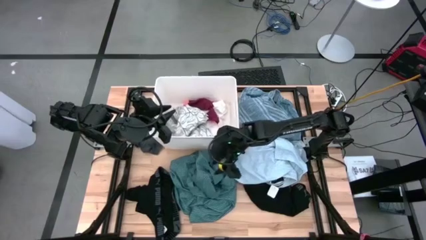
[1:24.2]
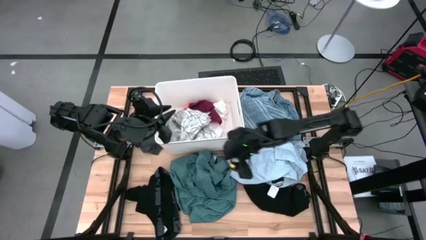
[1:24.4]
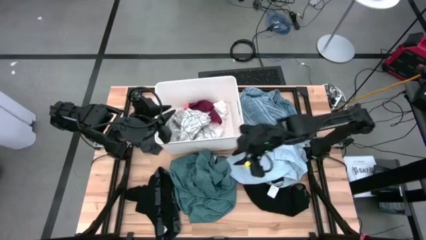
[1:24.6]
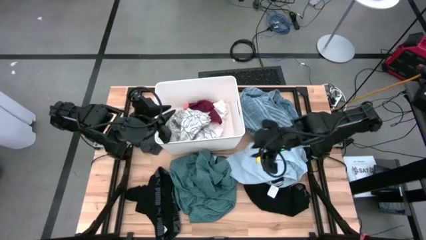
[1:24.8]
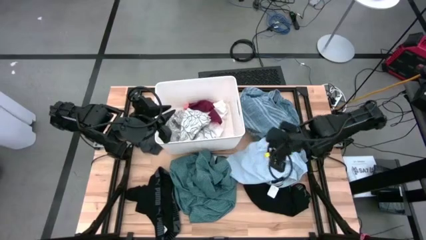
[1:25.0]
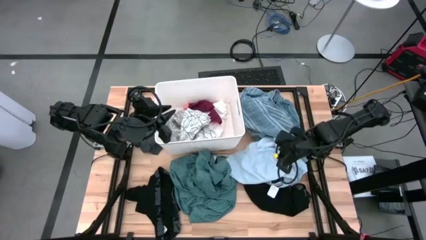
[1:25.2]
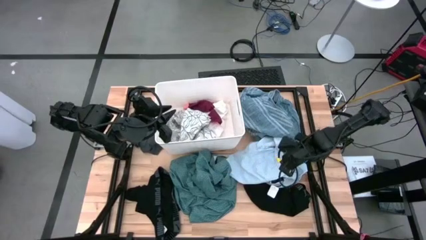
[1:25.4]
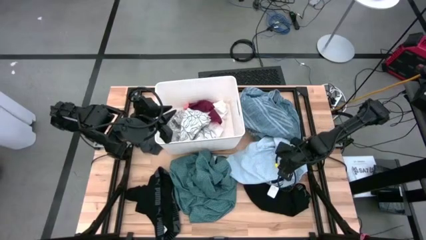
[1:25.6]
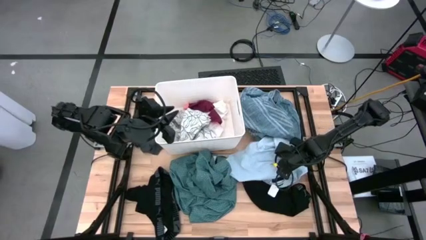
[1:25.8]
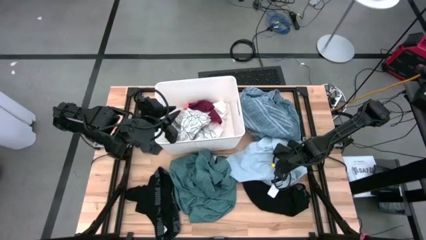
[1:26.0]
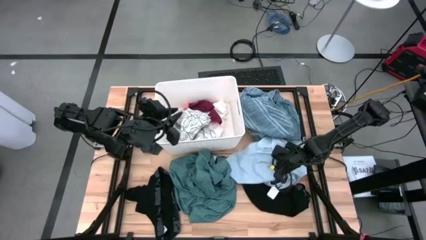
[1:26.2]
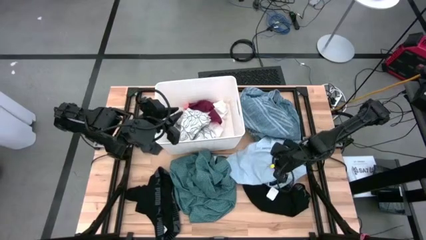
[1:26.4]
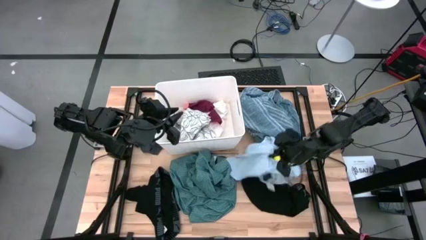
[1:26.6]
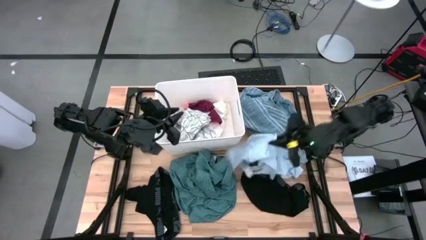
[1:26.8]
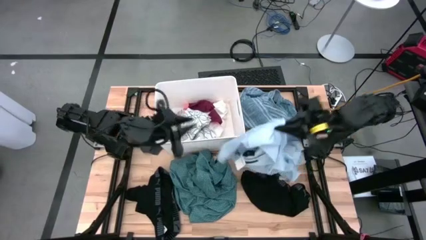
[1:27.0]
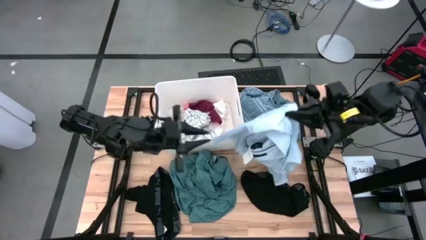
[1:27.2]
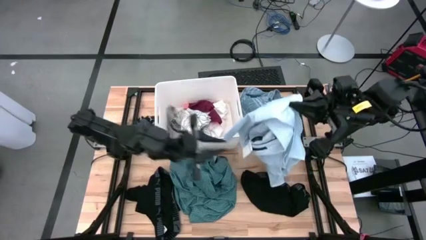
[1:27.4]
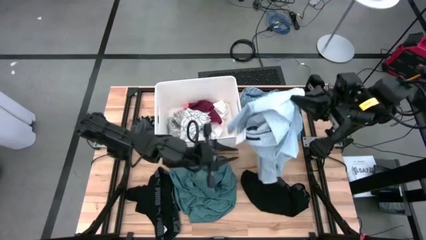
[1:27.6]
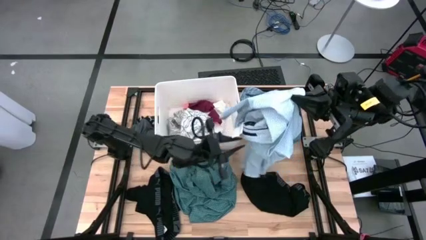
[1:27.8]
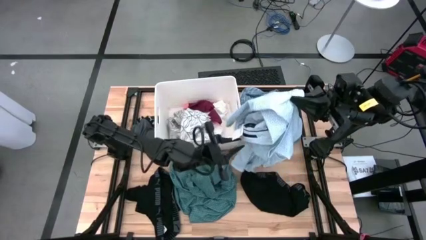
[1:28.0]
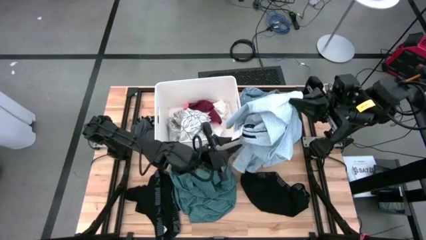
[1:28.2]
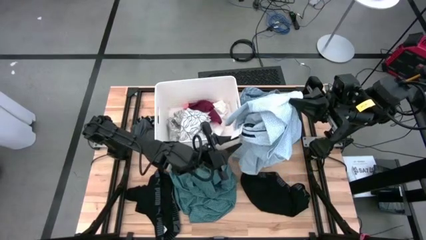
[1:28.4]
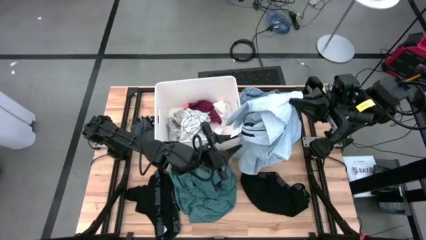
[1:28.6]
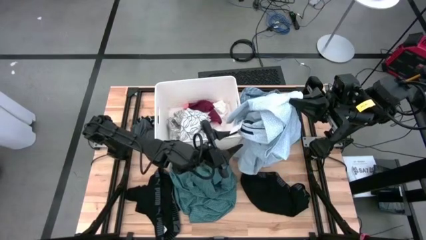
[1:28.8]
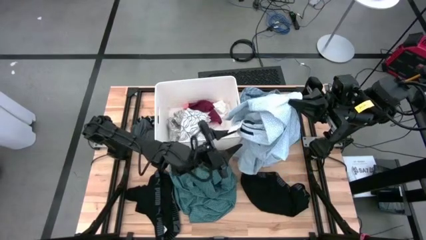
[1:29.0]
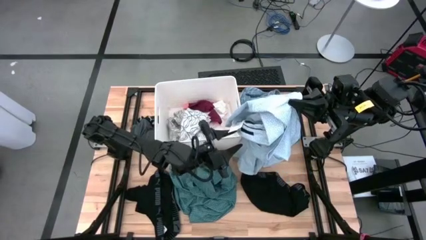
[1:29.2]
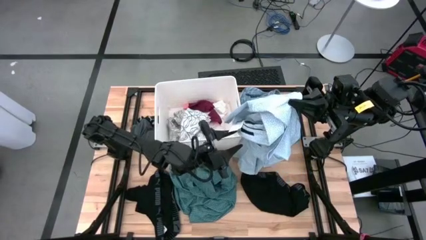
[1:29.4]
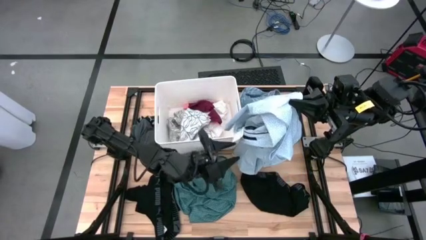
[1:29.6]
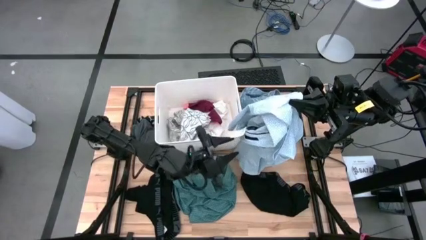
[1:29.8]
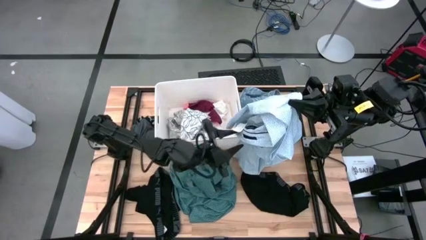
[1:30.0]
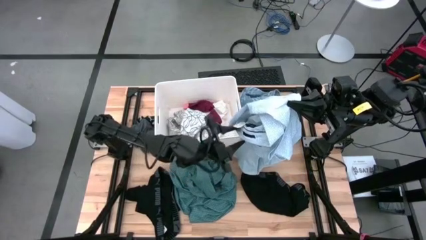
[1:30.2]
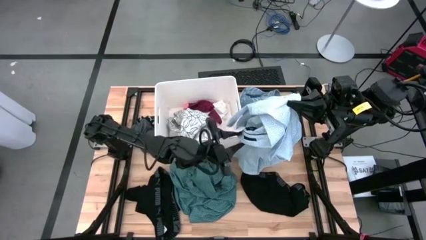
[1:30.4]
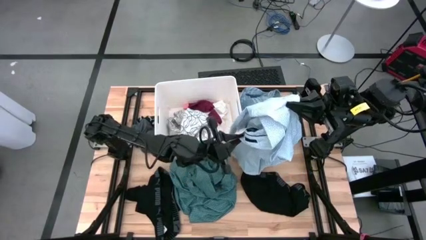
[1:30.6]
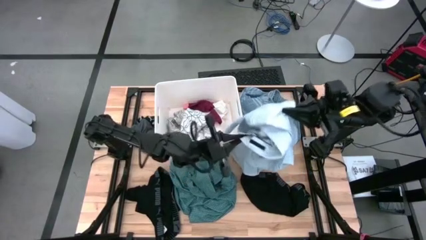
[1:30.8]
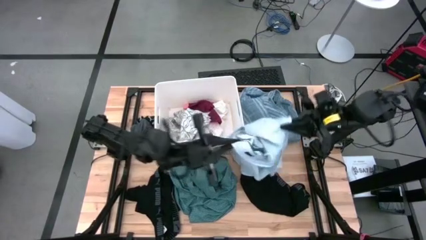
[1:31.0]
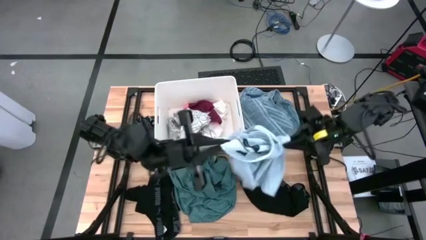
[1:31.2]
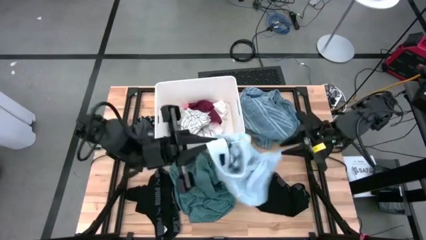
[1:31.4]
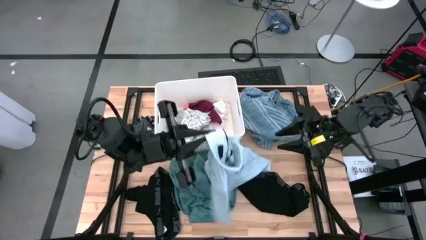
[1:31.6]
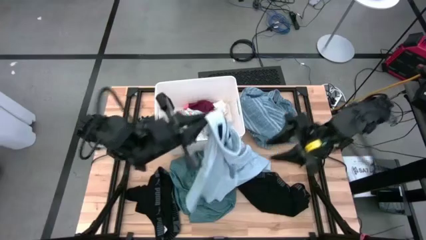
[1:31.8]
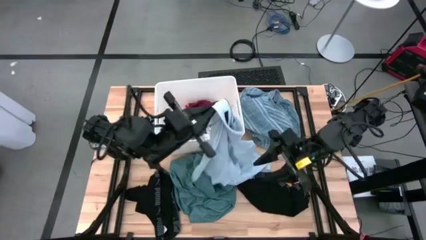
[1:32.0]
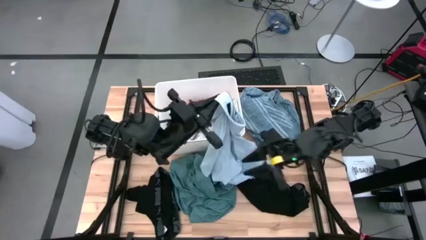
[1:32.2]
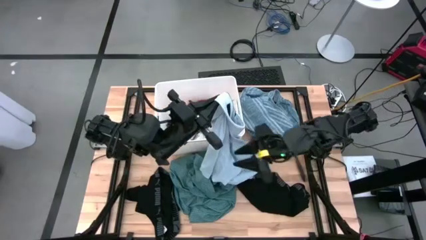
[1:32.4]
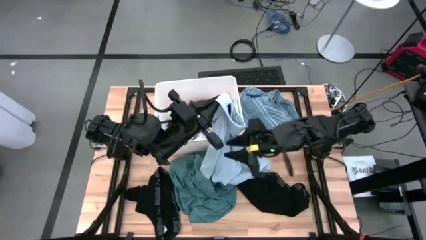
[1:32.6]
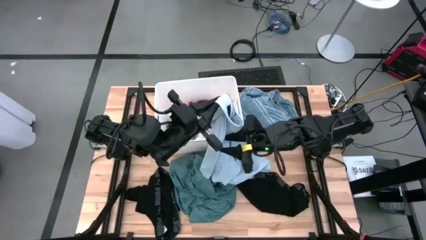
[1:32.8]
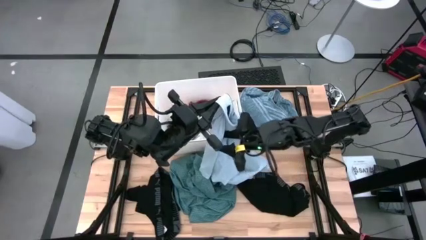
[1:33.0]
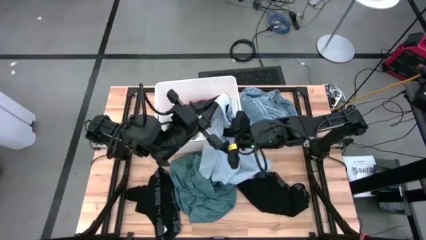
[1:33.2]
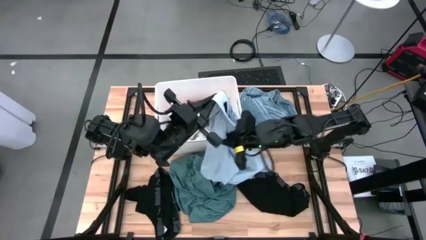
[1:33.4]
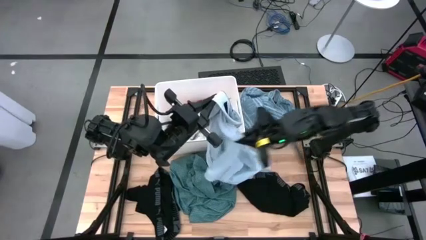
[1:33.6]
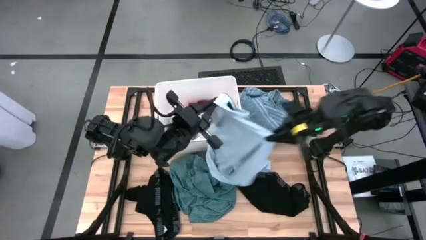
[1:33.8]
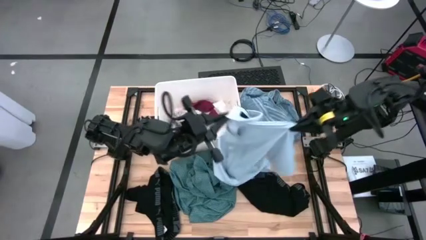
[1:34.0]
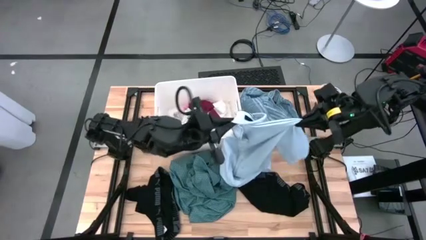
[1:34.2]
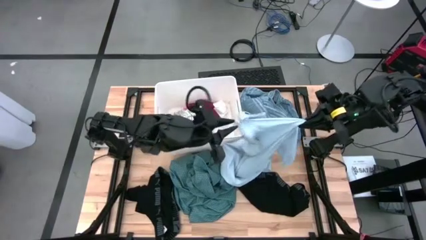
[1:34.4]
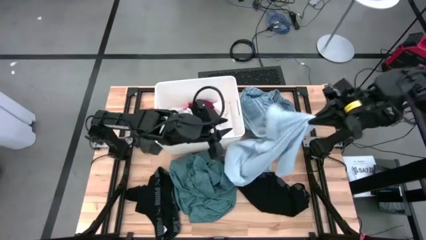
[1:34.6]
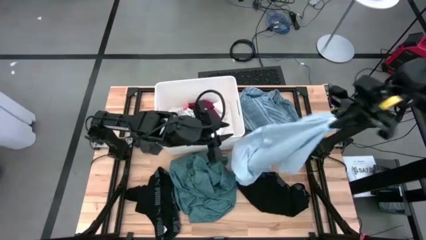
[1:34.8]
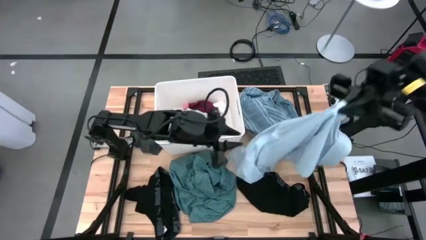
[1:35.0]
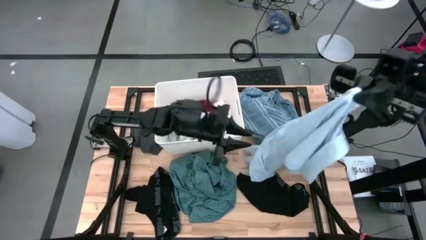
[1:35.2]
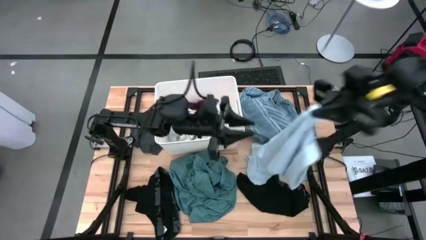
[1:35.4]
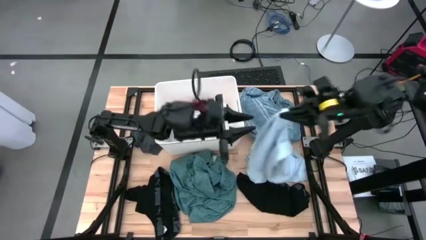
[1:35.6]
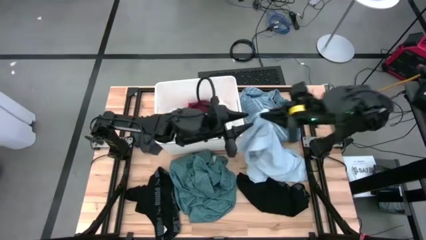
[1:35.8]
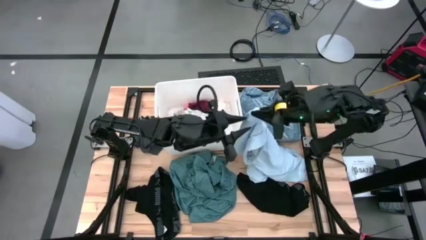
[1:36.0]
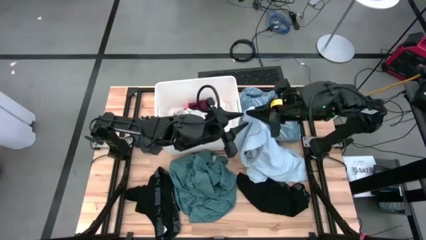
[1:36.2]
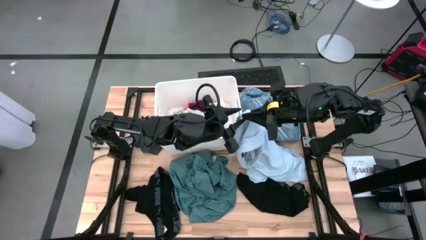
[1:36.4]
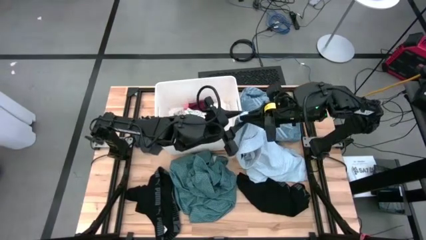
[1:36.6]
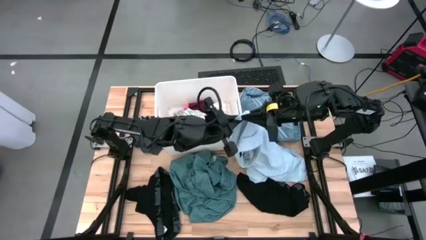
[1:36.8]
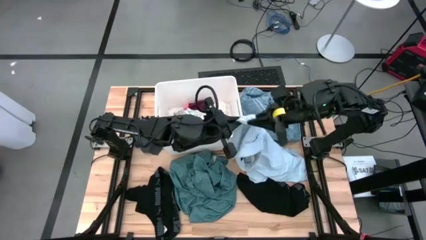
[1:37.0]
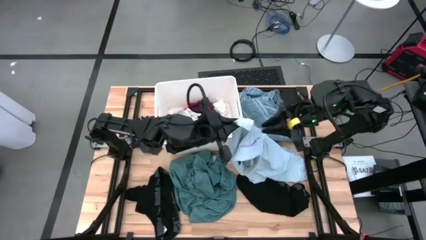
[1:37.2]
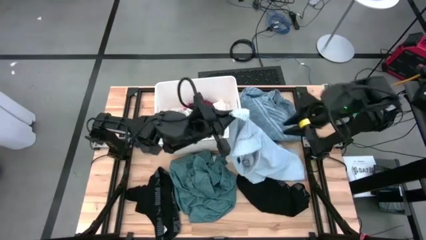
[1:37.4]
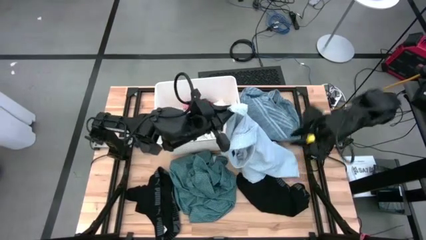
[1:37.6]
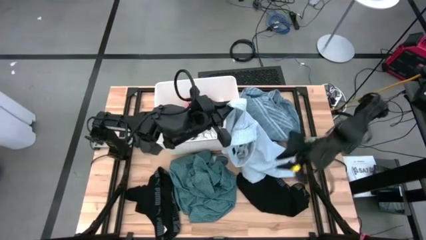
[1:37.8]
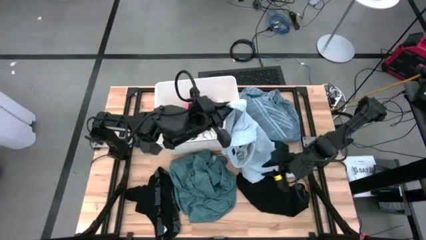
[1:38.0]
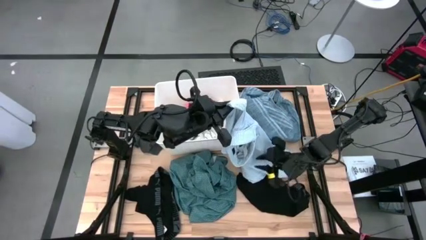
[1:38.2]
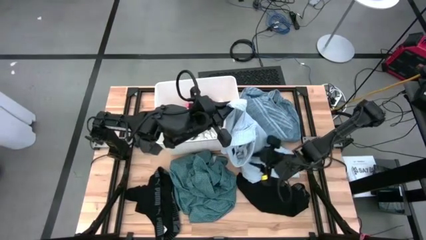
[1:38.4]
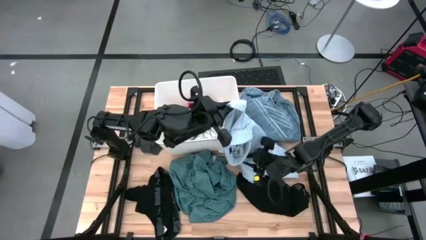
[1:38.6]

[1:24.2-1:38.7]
Task: Sort clothes
Put the light blue polo shirt into the white laundry organizer

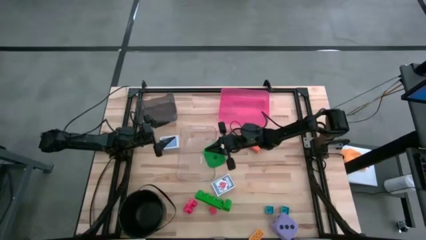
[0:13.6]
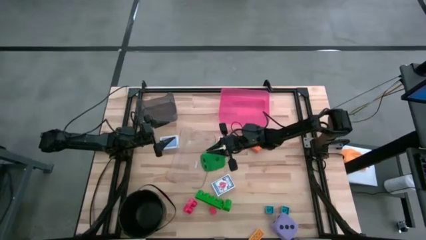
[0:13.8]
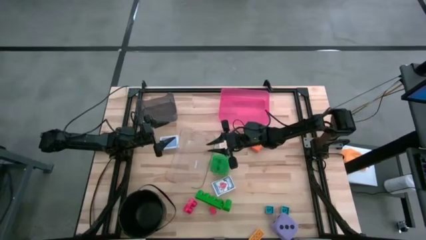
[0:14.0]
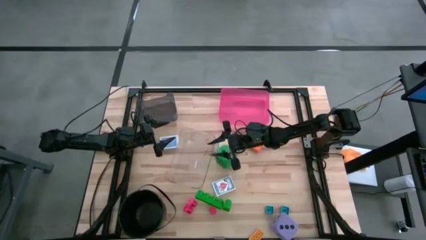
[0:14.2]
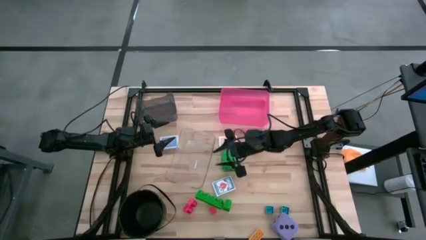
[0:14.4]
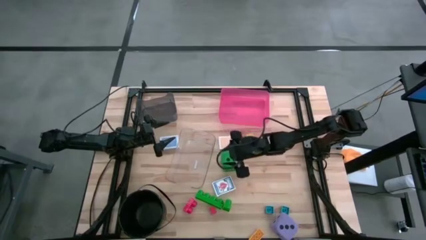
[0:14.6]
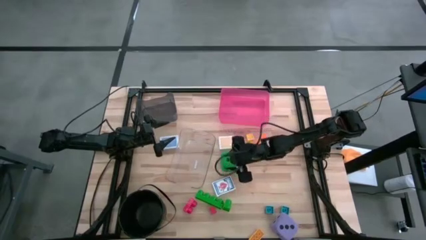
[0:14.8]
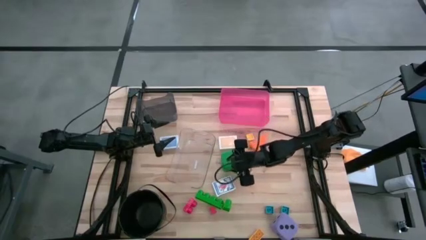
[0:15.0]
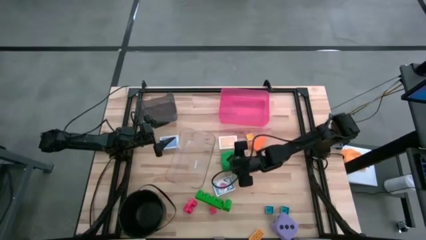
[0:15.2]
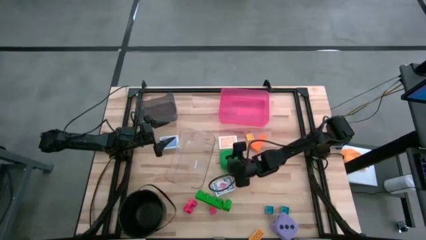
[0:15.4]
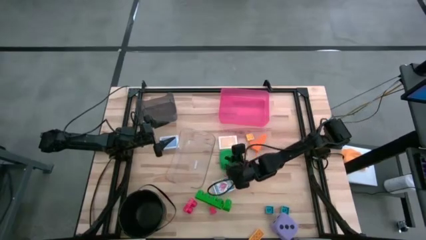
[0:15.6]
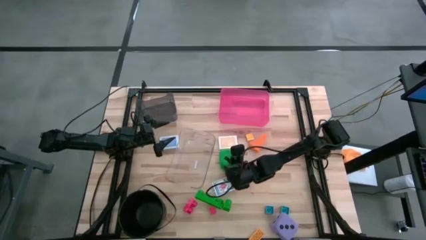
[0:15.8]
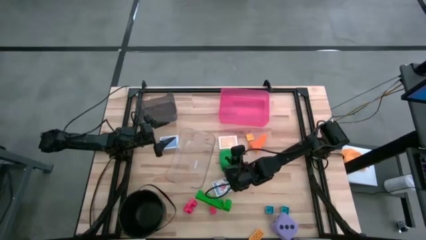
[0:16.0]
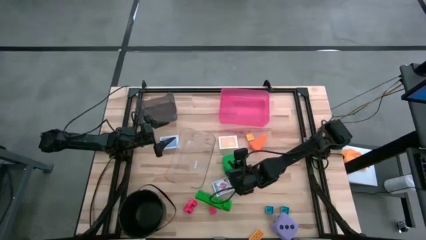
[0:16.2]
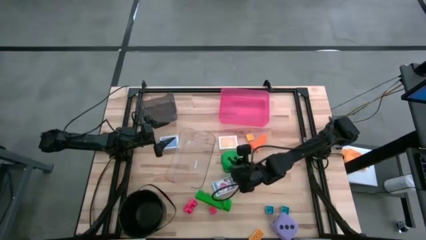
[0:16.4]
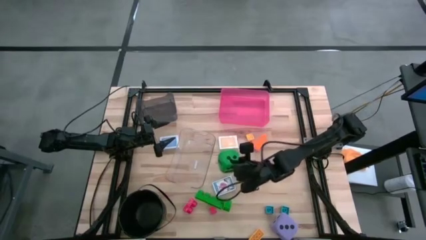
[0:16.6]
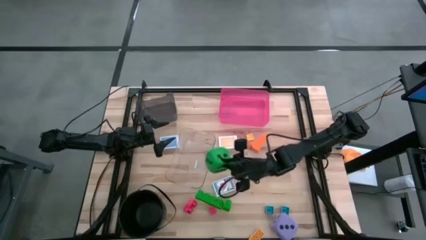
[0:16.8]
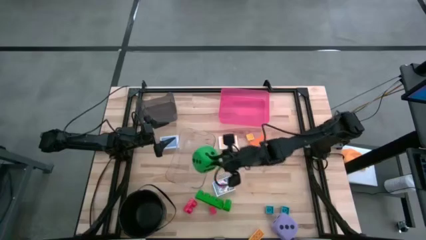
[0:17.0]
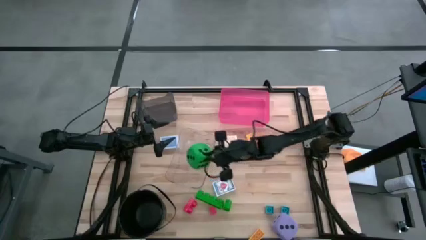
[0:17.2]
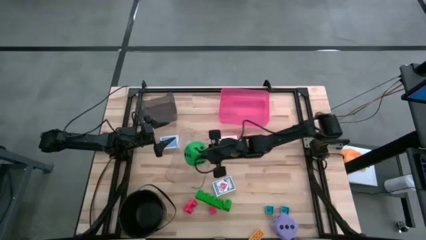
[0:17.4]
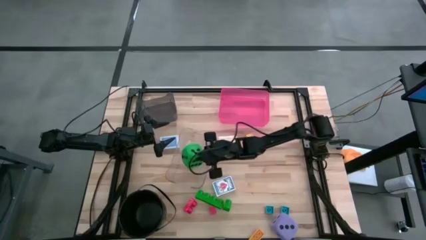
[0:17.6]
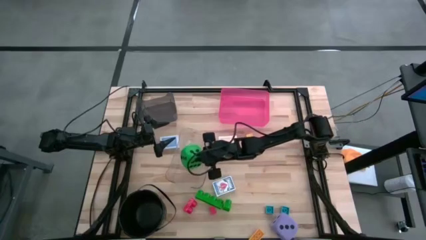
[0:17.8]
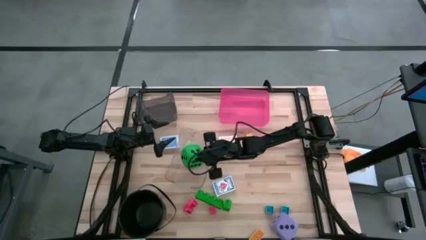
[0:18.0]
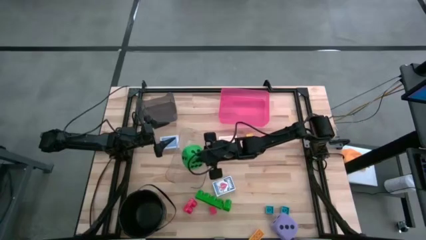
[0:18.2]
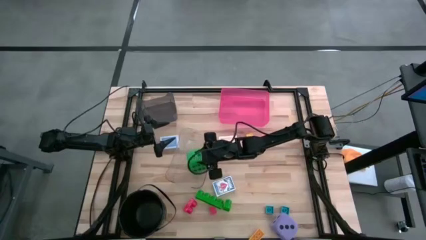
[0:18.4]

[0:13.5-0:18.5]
Task: Pick & Place Toys
Put the green dice into the transparent bin
